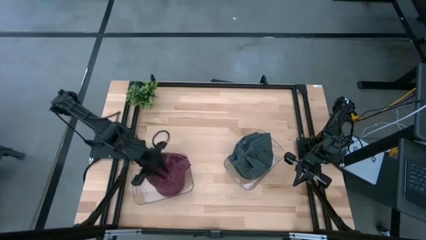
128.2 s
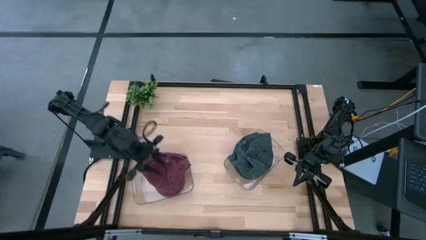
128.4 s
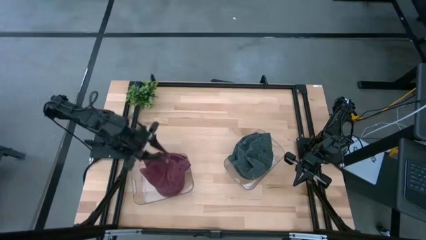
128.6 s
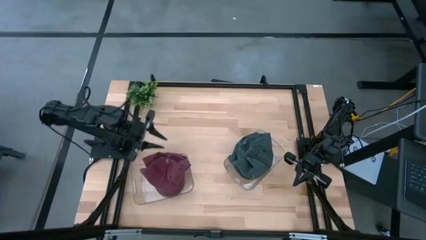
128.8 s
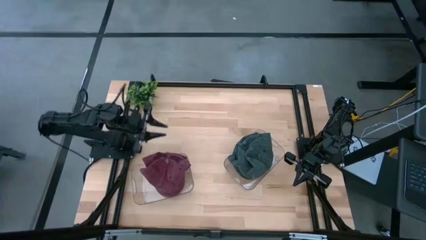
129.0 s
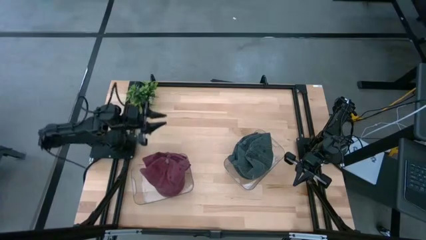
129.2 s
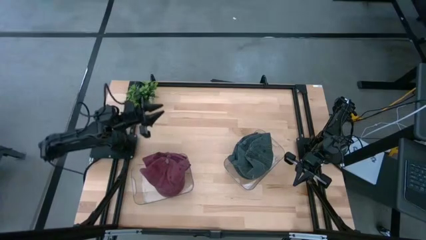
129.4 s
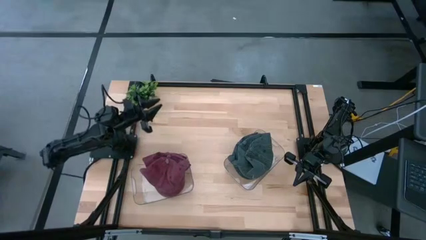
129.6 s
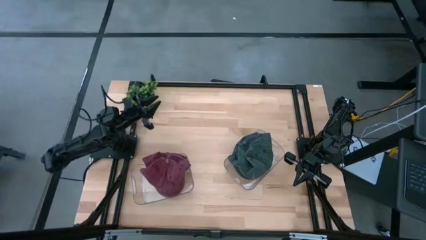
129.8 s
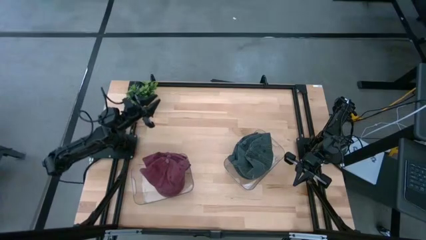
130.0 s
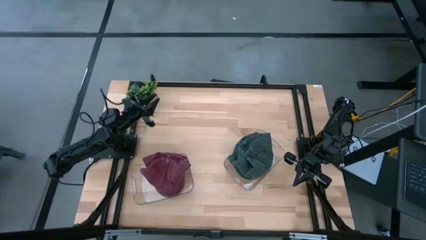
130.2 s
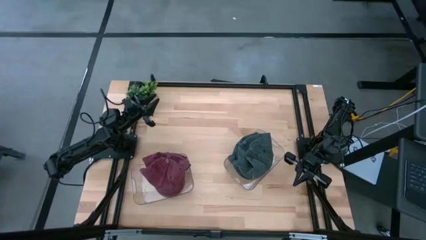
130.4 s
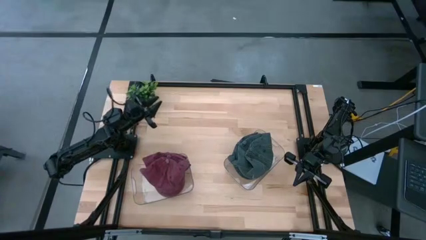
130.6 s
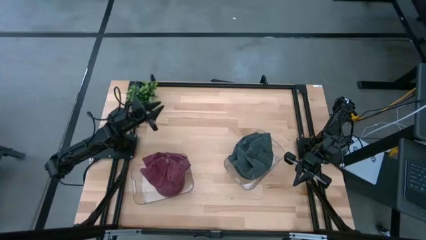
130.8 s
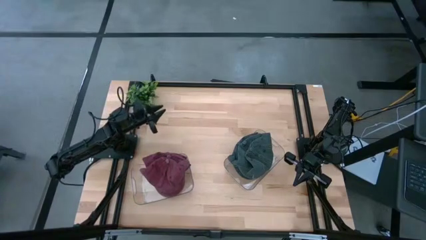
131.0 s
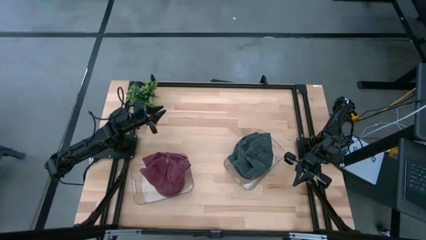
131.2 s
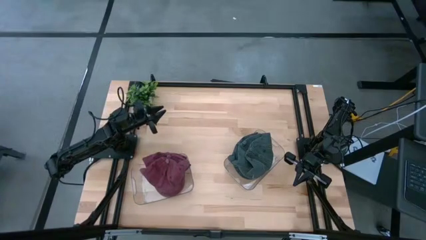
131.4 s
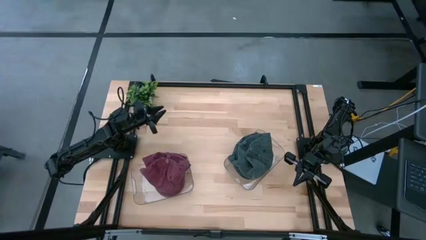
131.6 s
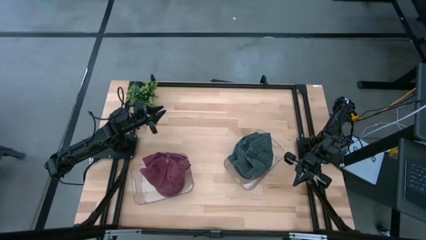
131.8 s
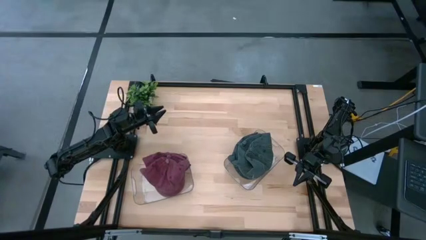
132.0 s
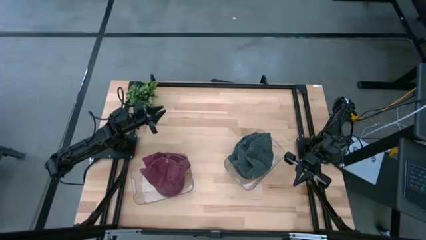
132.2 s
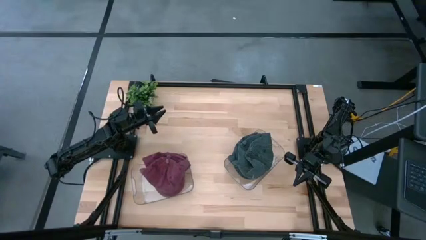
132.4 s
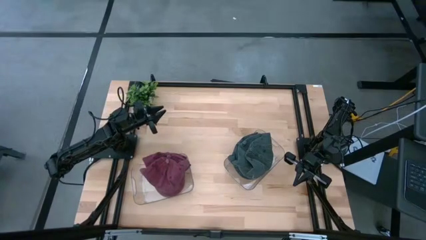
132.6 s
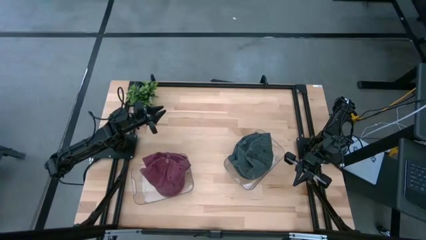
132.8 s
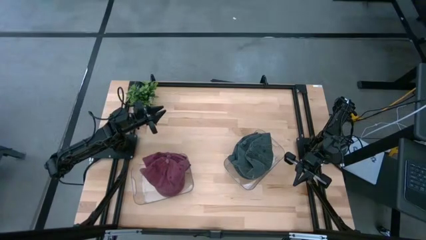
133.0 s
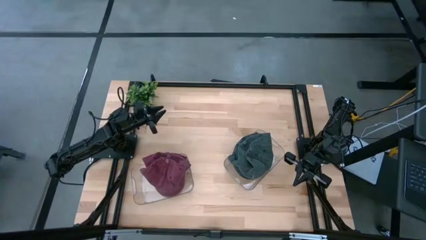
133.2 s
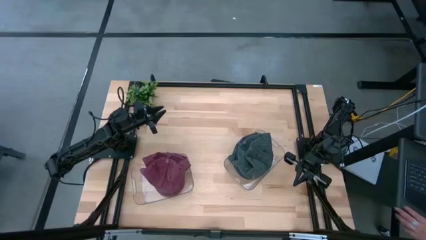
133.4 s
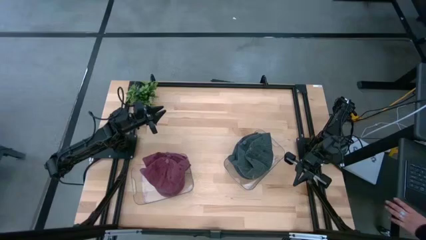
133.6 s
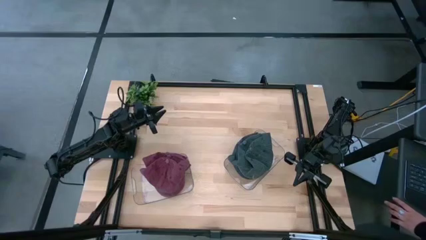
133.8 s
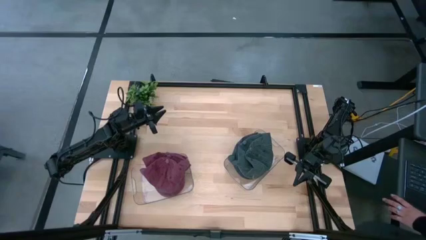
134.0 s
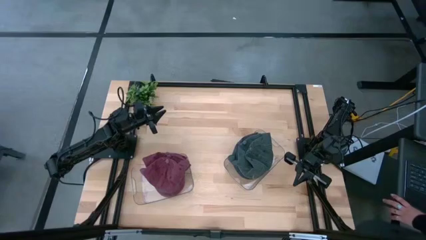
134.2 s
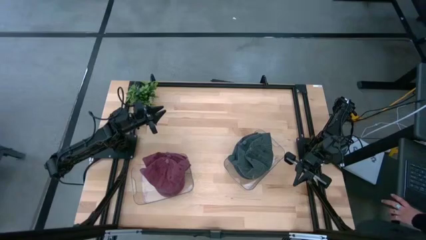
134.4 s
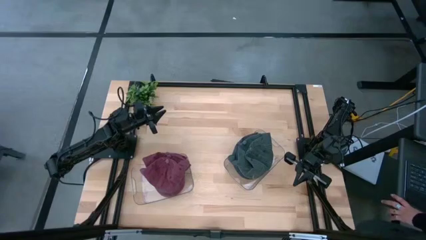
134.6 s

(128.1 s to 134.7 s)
Task: Pick & Place hat
Return to Home Position

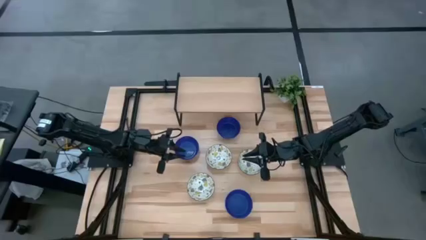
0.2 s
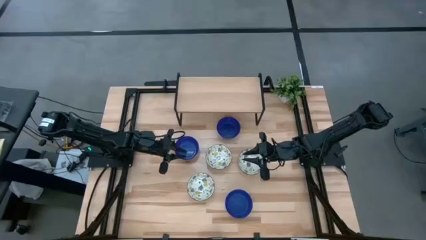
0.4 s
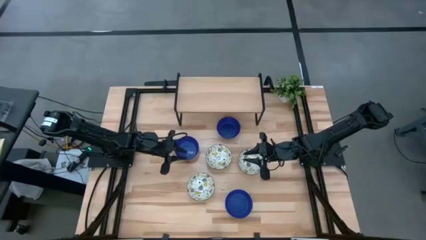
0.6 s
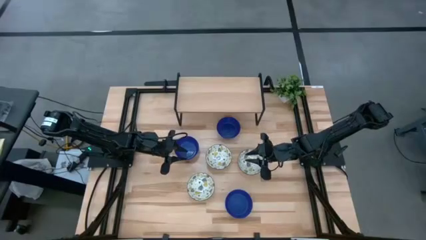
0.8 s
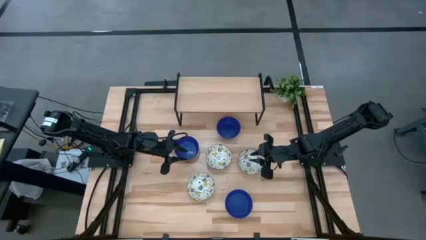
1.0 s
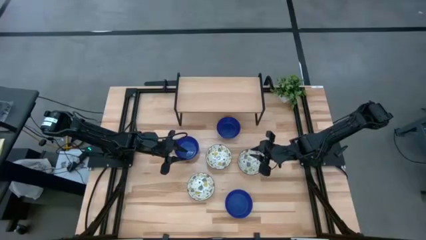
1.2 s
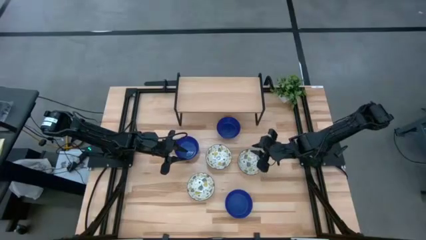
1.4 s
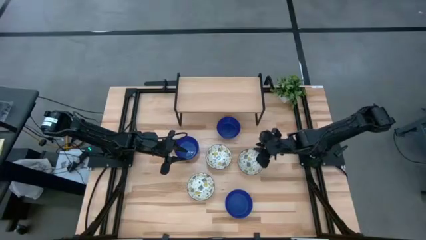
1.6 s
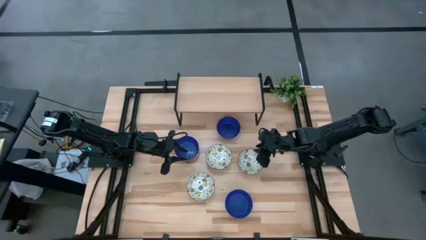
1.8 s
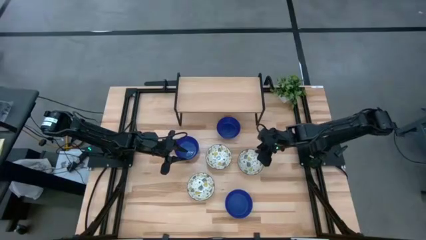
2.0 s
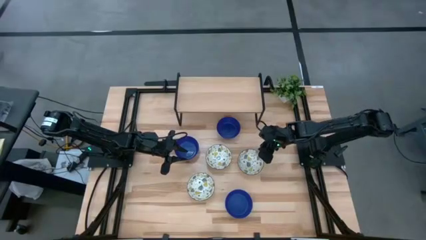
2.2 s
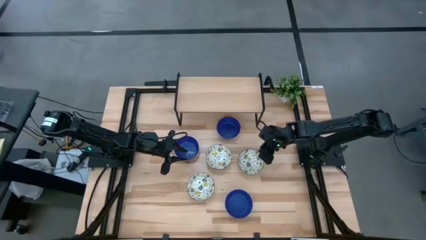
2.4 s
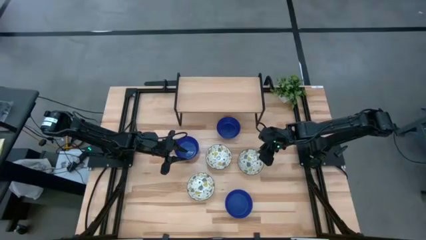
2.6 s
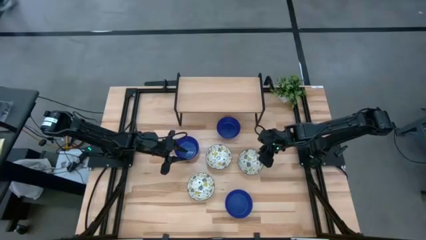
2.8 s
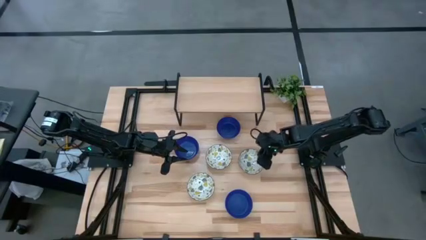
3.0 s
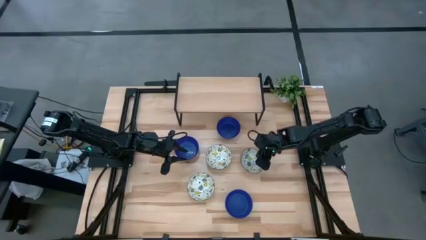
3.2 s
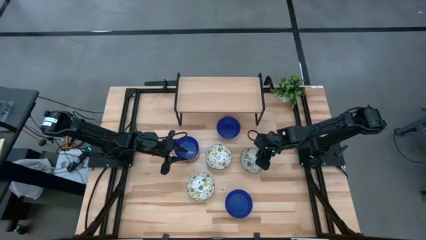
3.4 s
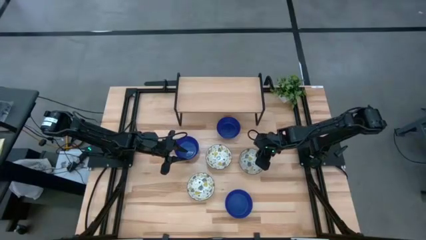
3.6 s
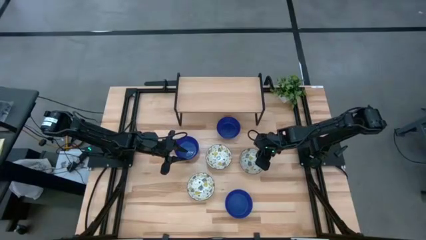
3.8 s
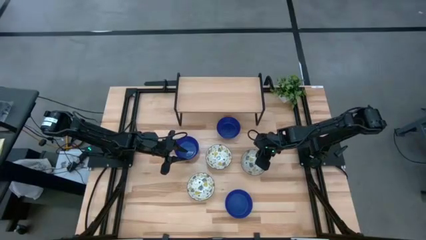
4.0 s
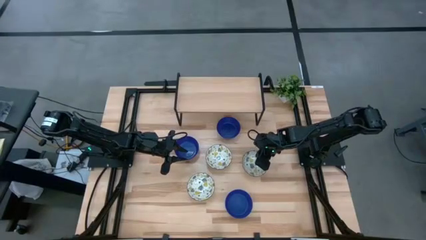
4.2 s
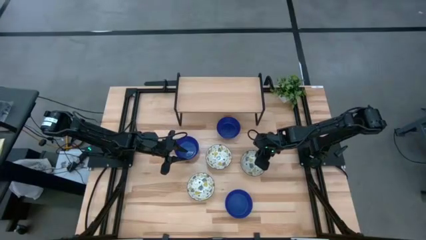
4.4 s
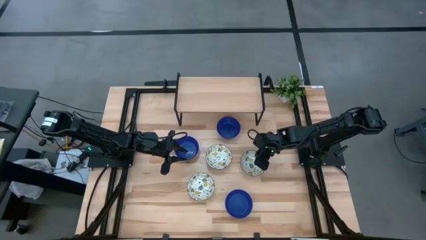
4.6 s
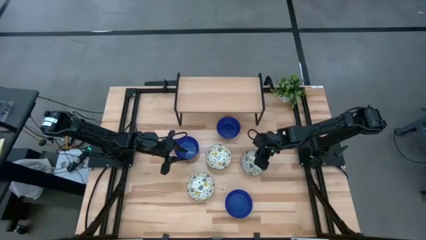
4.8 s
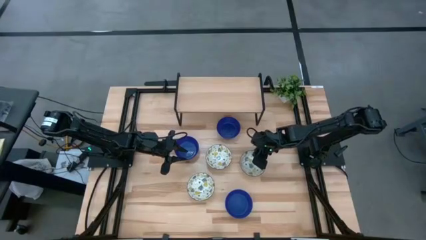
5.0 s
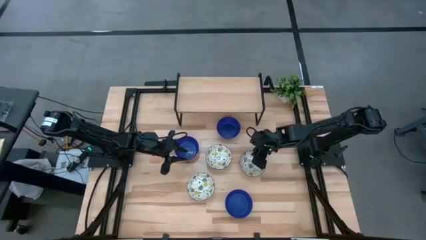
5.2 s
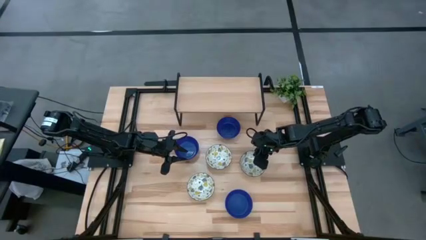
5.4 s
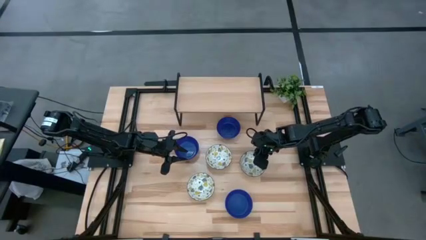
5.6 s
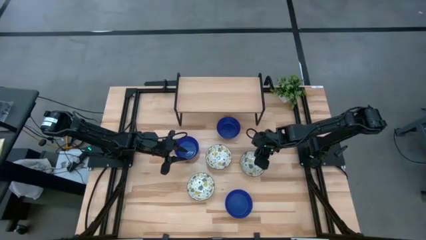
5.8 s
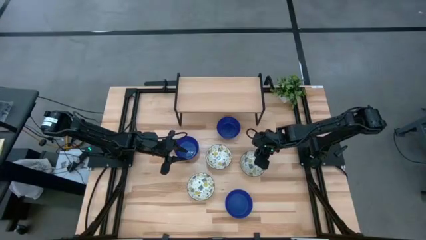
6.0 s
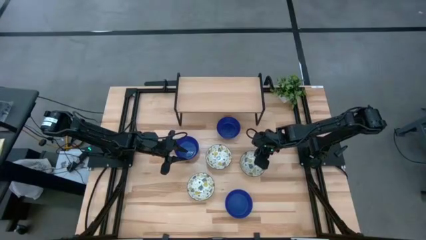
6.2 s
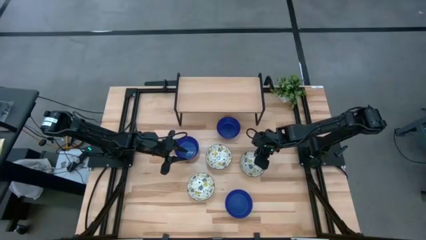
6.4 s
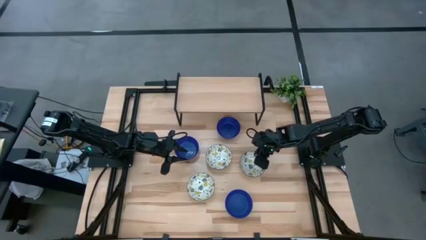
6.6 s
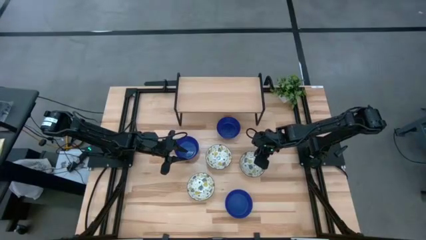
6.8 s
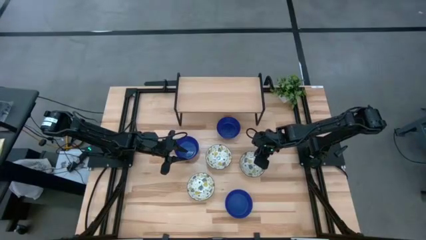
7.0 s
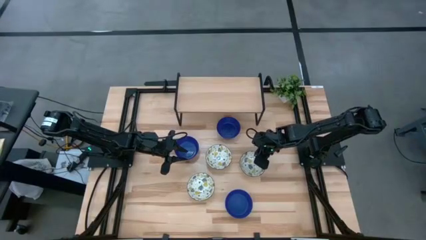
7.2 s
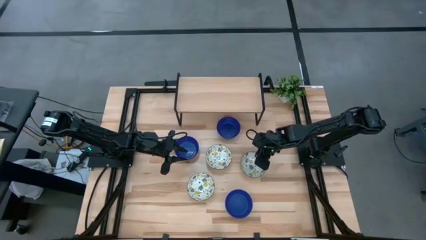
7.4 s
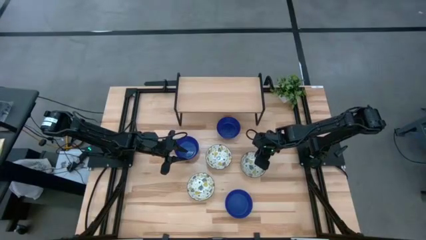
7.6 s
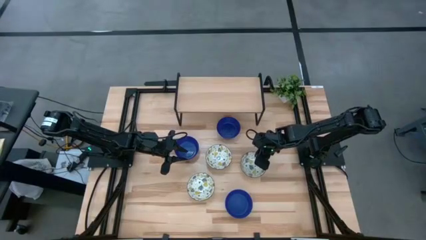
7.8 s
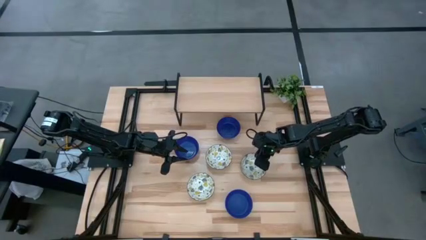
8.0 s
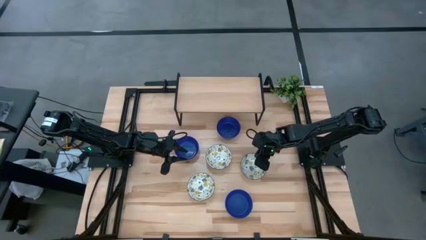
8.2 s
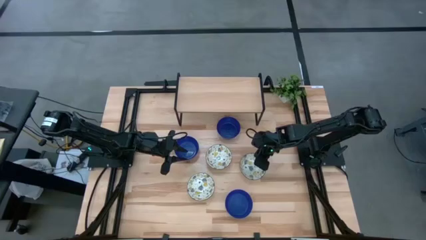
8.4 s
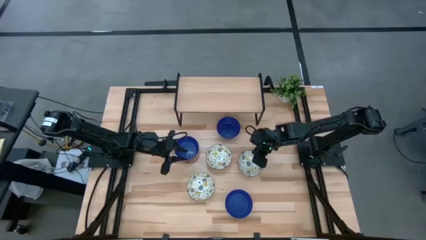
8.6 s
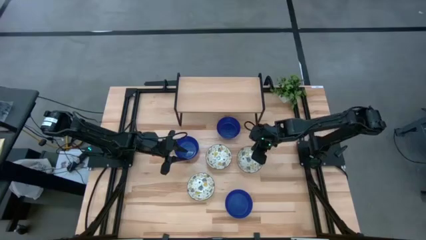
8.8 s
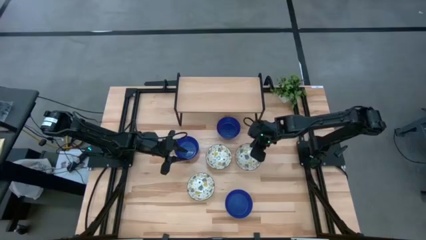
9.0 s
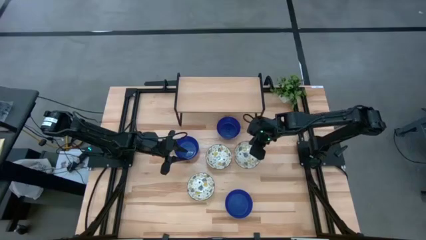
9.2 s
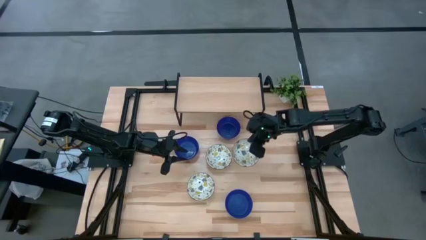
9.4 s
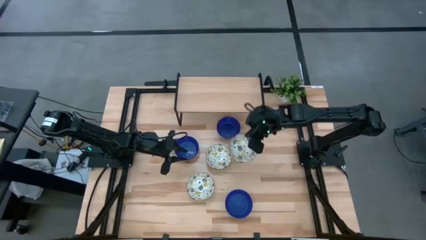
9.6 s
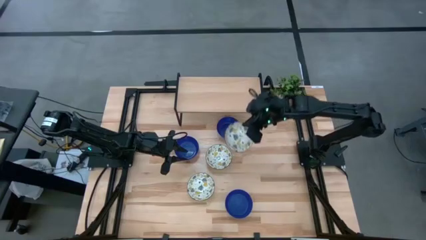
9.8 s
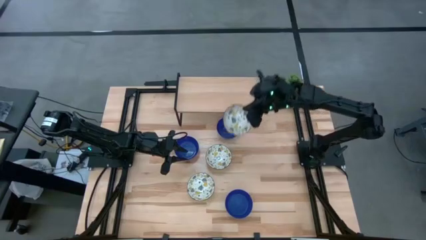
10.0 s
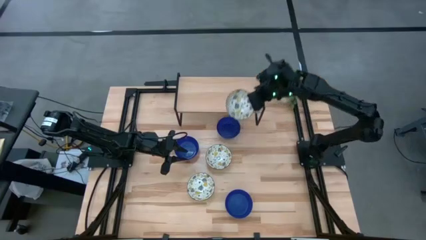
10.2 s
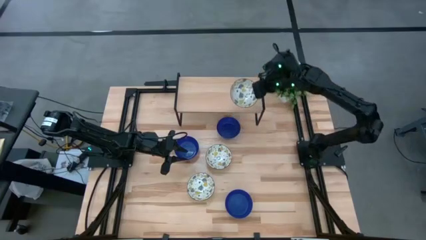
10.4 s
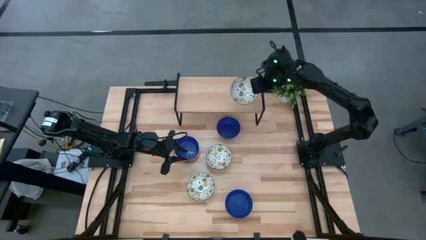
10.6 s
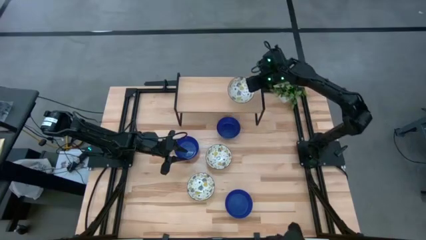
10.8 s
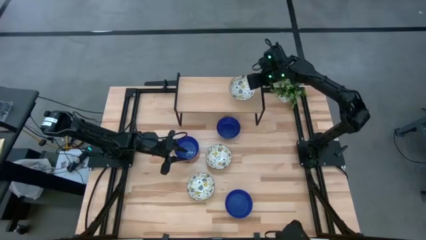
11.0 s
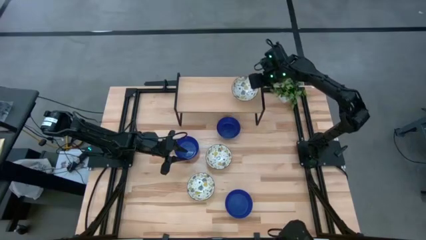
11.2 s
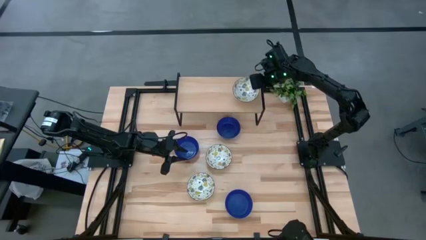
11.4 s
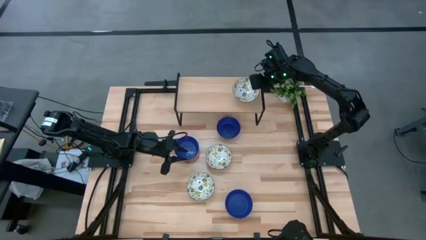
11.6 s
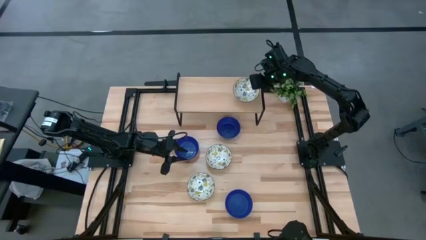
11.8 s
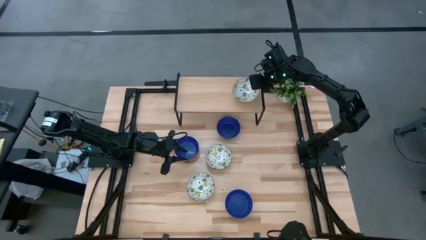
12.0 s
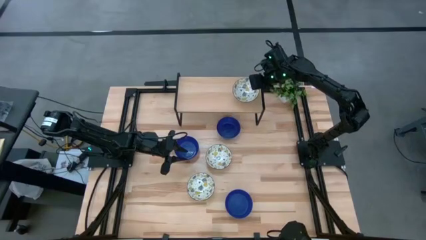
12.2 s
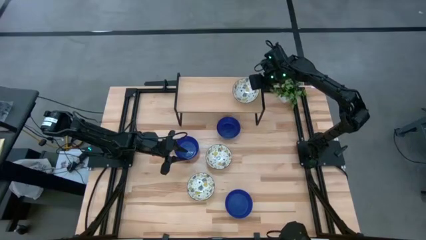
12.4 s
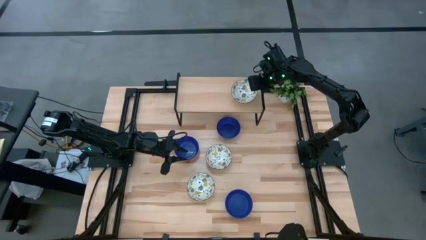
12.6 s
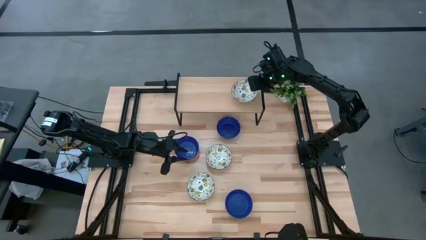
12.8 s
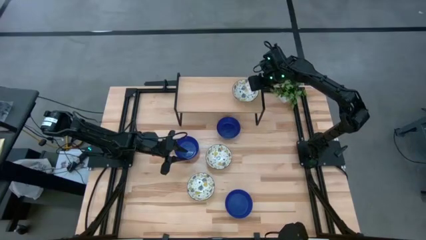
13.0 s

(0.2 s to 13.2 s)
Task: Pick & Place Mini bowls
Put the top right yellow patterned bowl on the shelf
